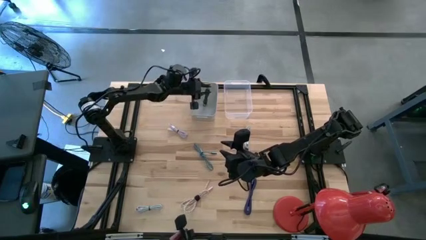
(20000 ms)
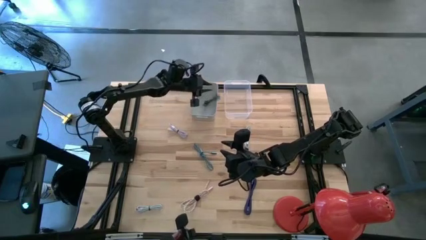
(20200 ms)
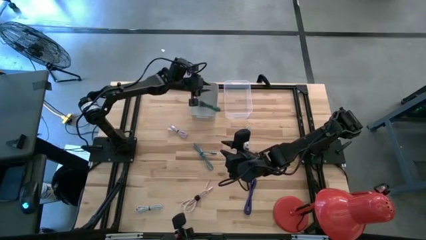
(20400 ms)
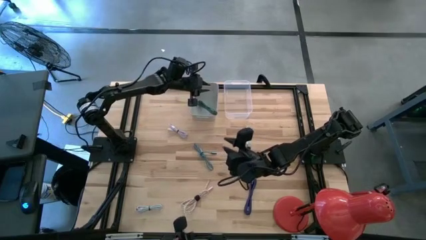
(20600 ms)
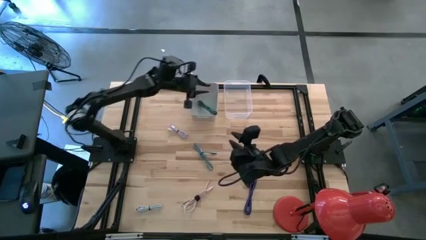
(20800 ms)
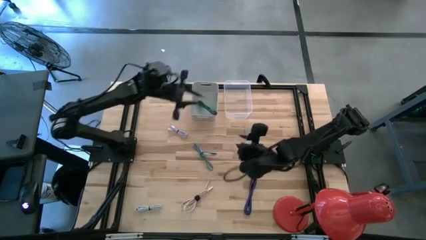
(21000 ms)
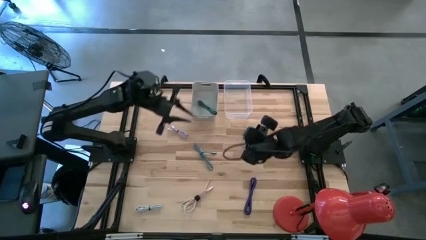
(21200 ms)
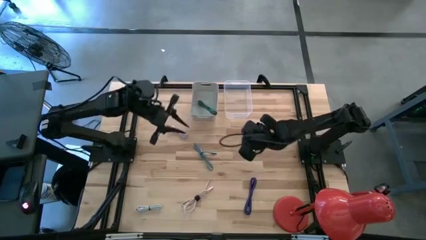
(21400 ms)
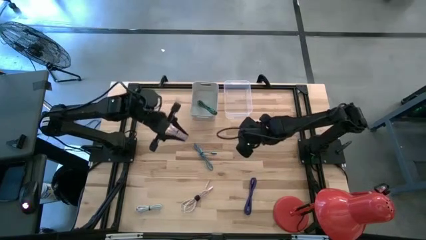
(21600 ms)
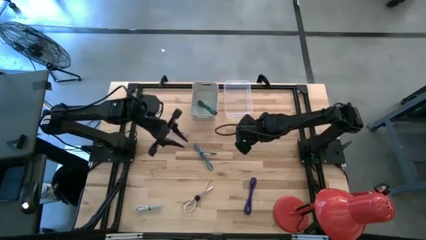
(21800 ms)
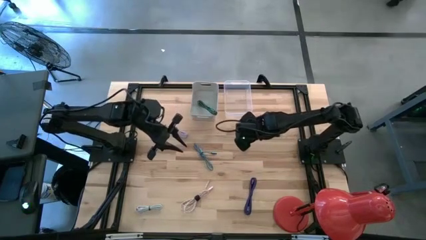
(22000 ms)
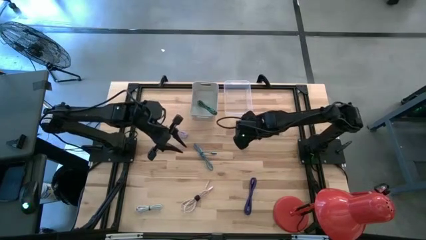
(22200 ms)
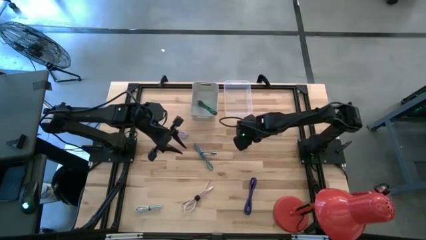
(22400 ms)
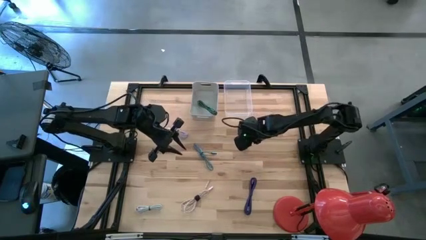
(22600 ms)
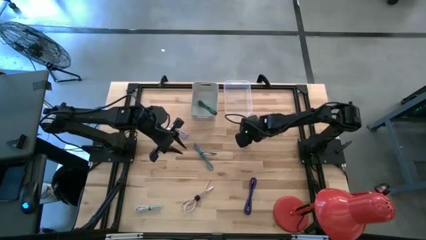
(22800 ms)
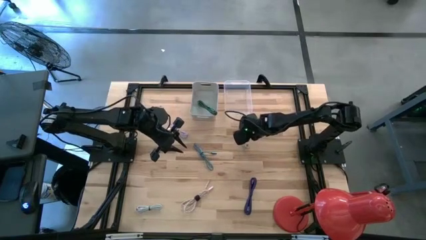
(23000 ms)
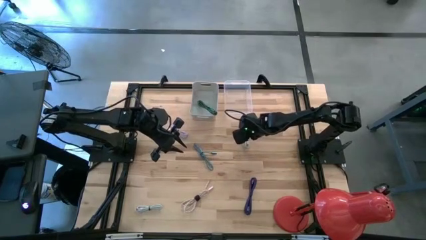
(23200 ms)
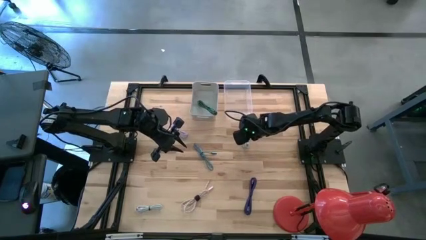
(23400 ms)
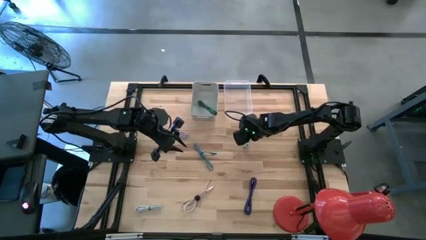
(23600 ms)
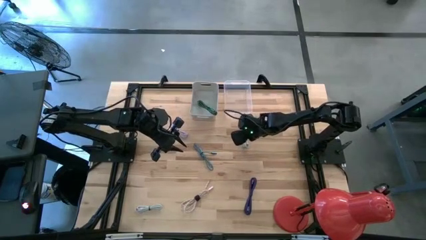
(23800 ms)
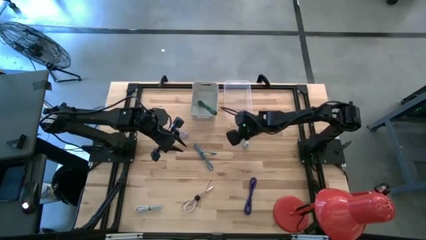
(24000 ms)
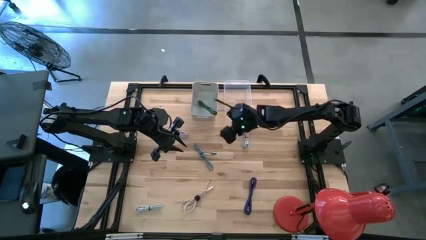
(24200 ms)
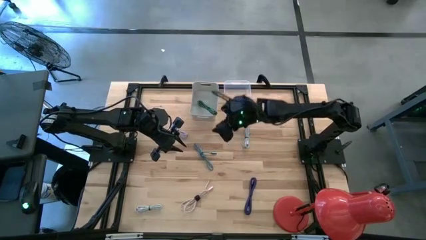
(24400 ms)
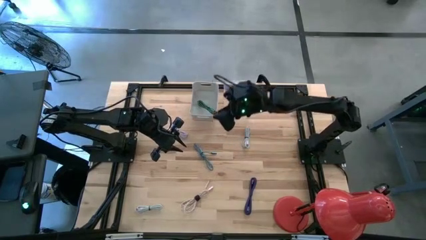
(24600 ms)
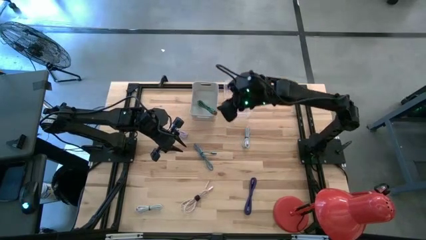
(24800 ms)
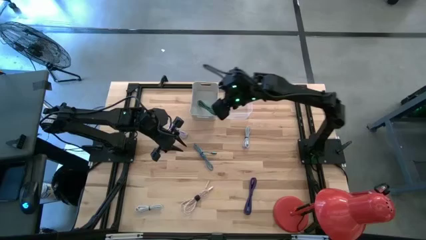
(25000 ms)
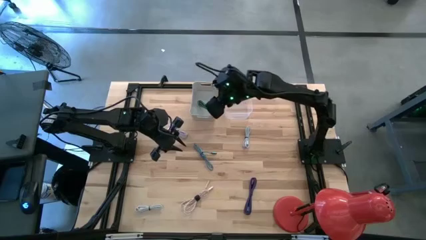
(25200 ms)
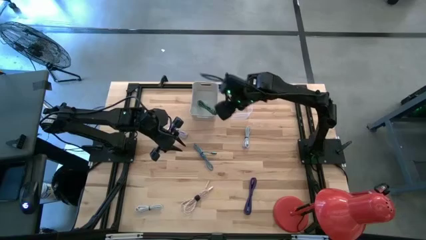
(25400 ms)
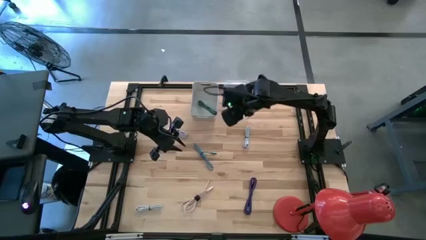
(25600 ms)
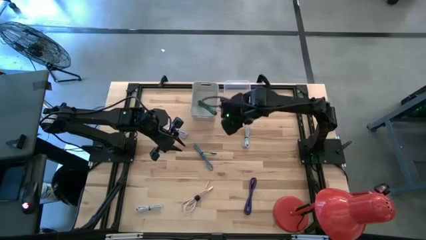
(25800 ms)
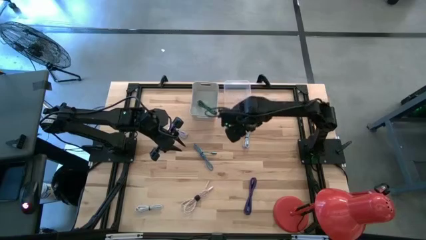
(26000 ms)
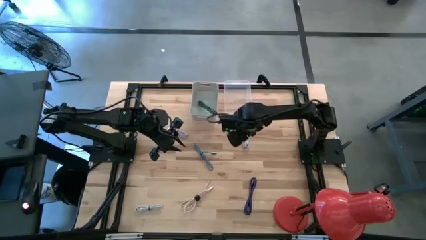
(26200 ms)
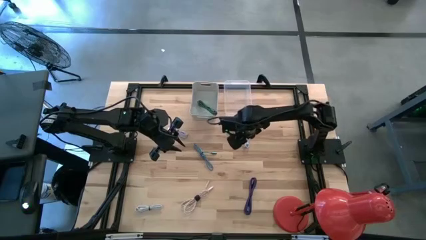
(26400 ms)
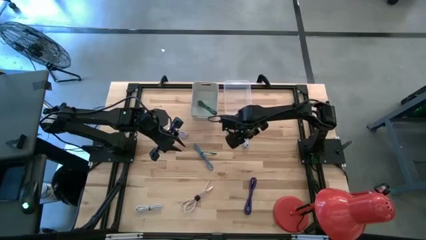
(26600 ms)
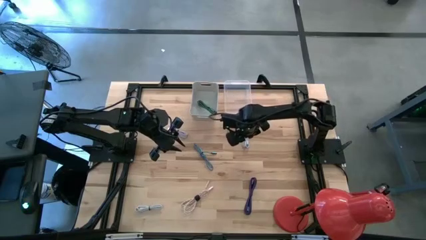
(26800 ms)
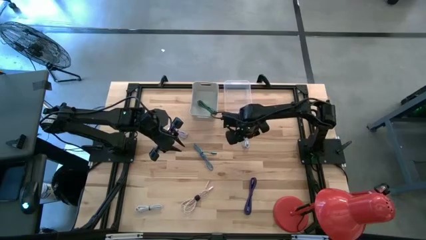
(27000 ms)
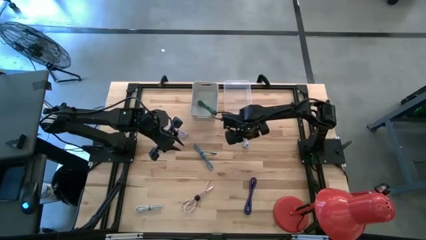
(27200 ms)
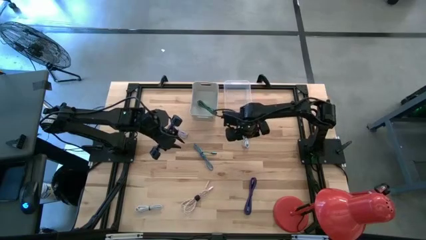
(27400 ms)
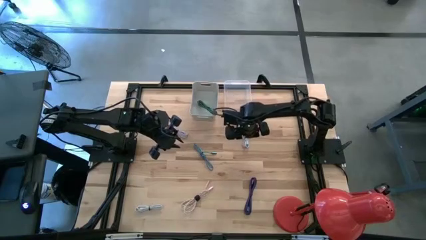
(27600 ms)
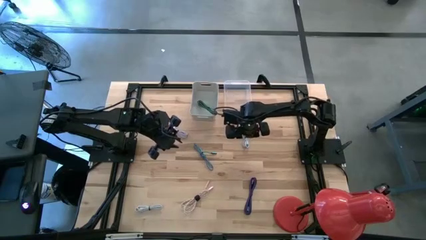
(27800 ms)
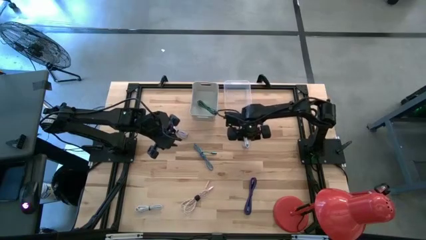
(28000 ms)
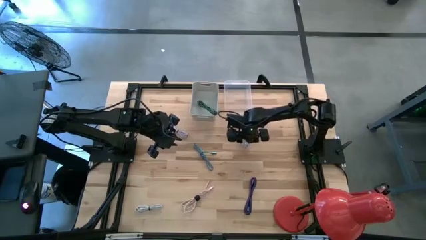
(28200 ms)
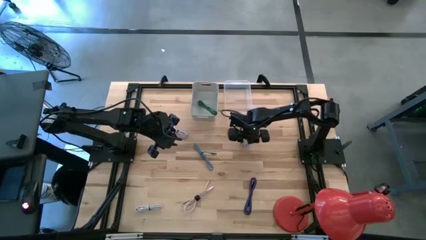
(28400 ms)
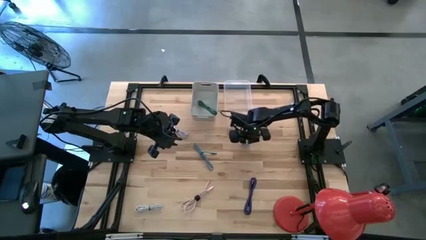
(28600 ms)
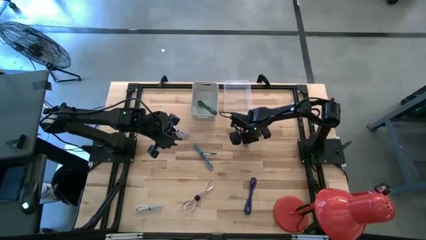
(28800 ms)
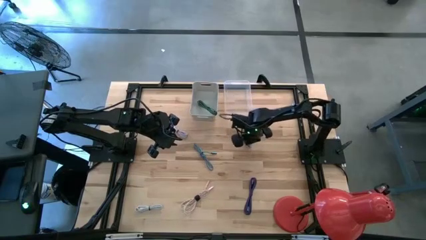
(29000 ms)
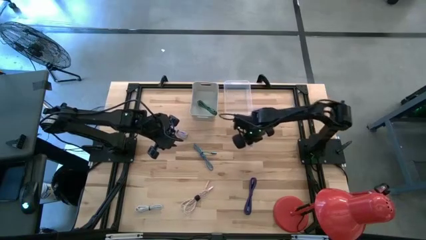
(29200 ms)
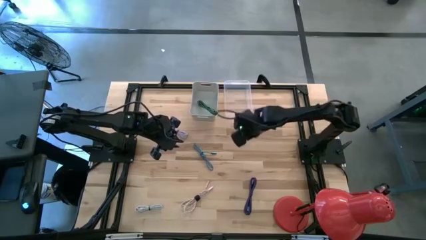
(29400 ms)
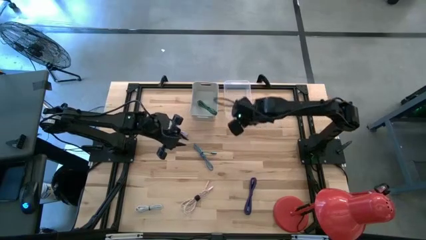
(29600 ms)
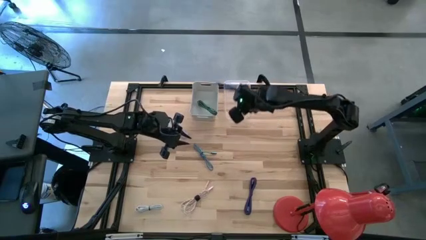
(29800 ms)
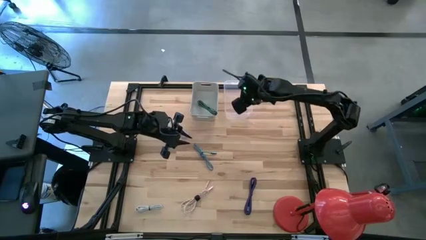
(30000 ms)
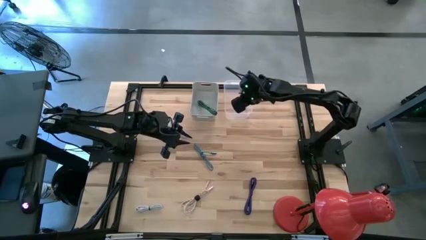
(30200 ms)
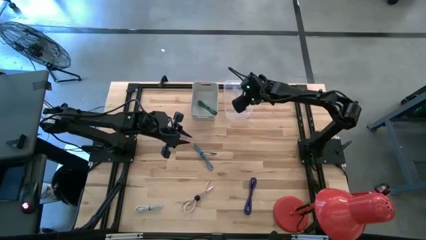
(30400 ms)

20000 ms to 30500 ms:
Task: Pick & Place USB Port
Put the blue charger cable into the transparent bin
